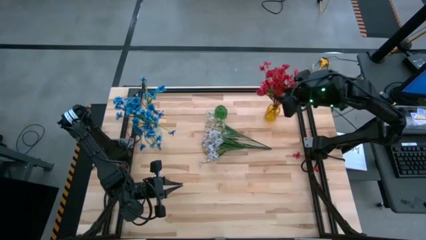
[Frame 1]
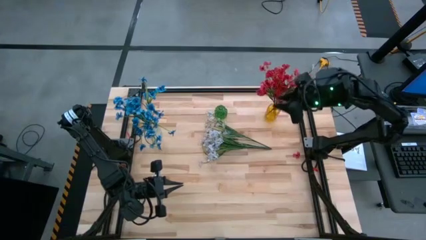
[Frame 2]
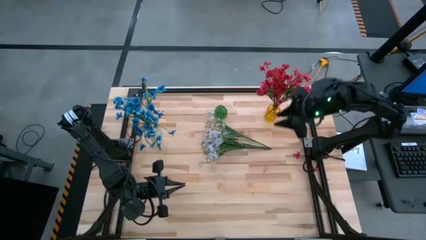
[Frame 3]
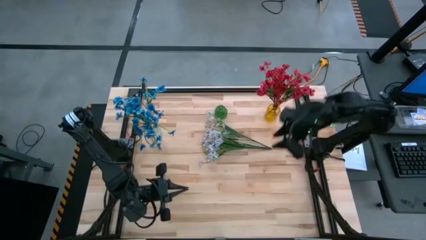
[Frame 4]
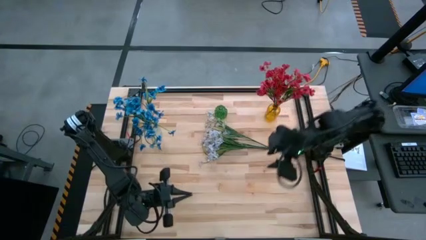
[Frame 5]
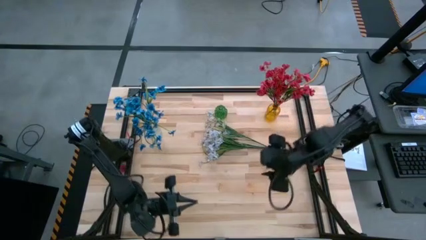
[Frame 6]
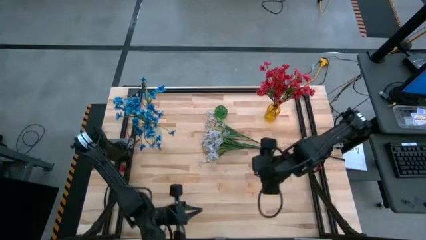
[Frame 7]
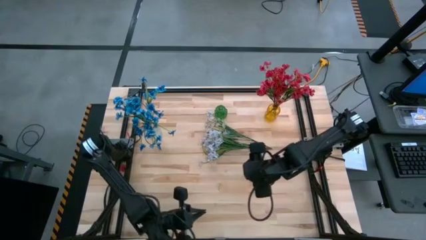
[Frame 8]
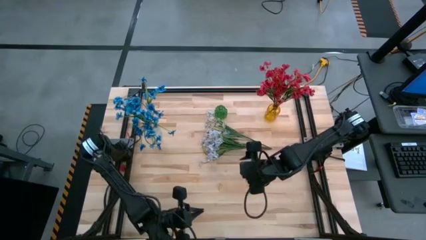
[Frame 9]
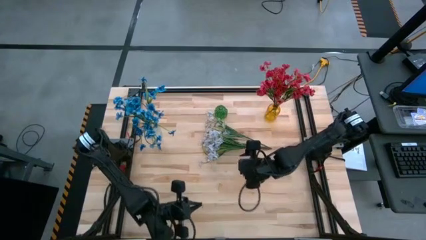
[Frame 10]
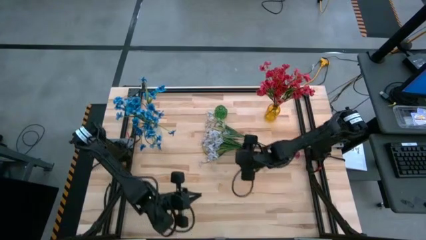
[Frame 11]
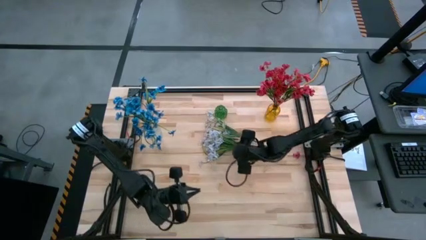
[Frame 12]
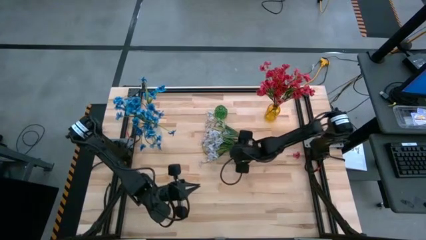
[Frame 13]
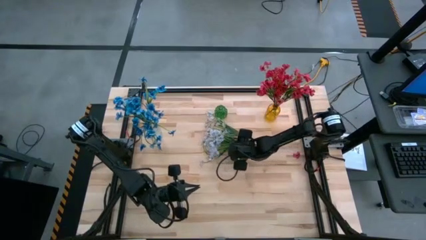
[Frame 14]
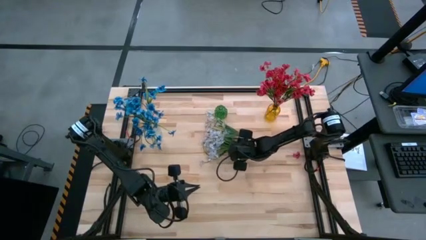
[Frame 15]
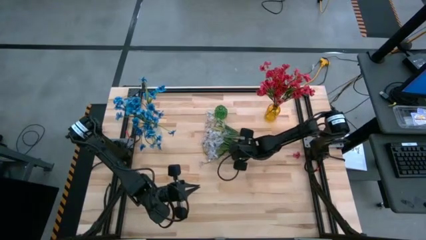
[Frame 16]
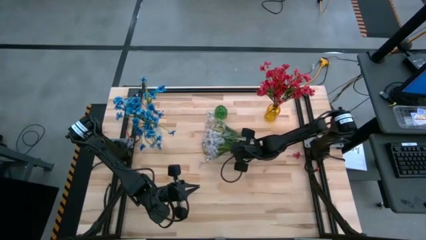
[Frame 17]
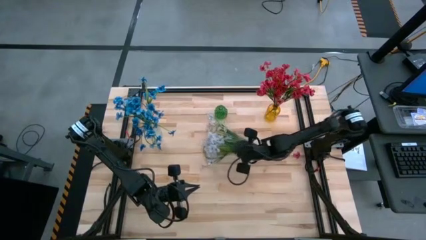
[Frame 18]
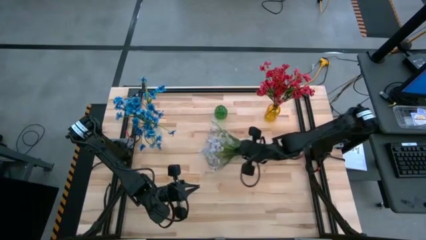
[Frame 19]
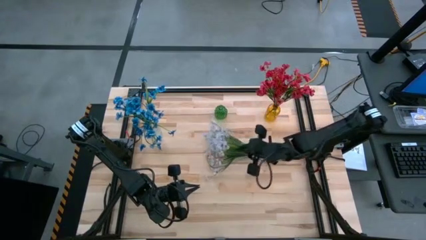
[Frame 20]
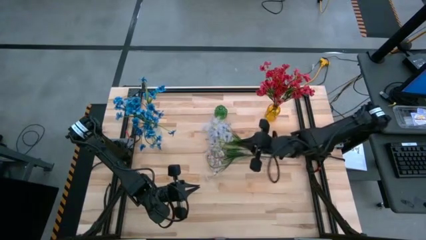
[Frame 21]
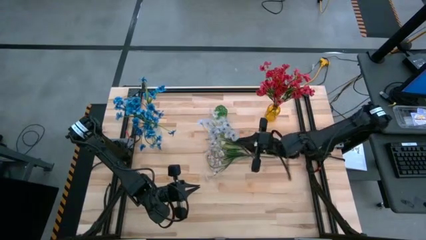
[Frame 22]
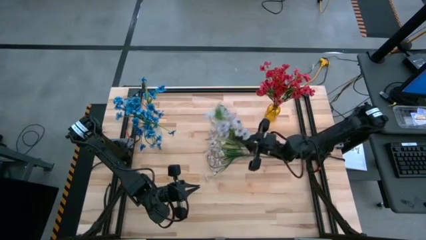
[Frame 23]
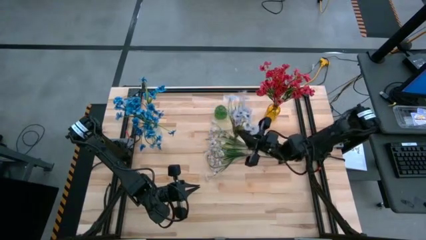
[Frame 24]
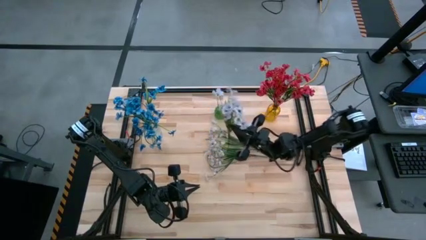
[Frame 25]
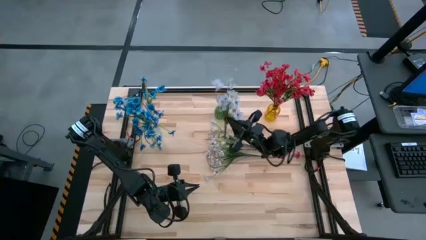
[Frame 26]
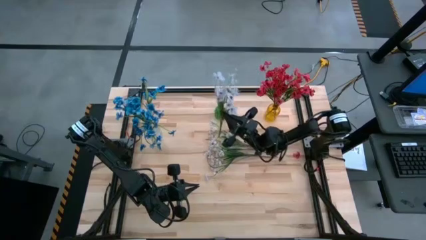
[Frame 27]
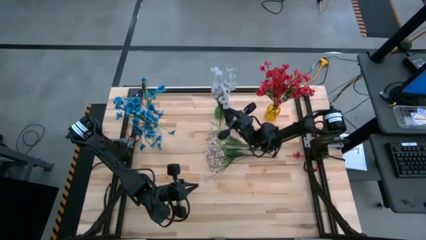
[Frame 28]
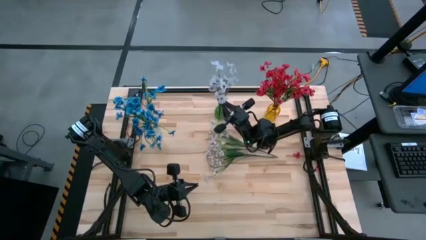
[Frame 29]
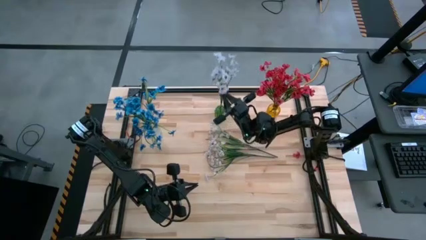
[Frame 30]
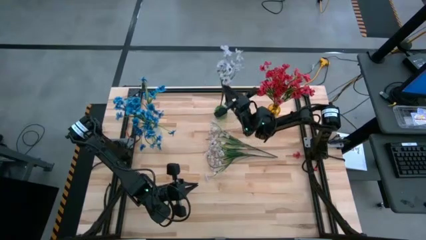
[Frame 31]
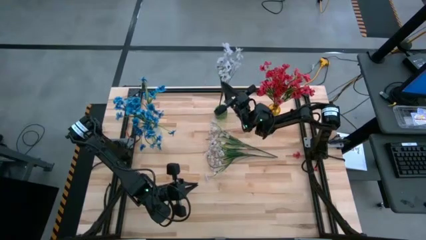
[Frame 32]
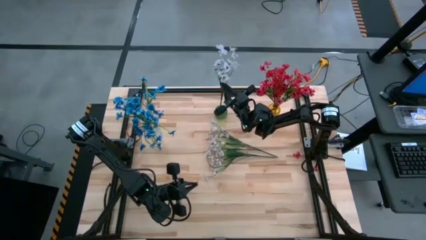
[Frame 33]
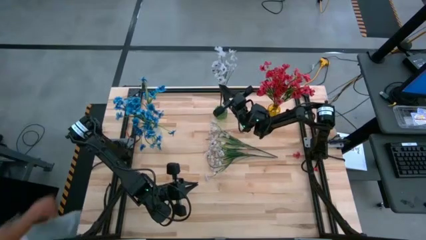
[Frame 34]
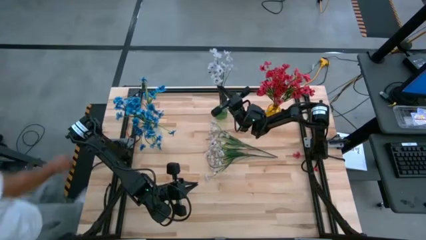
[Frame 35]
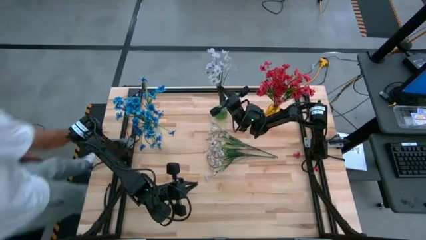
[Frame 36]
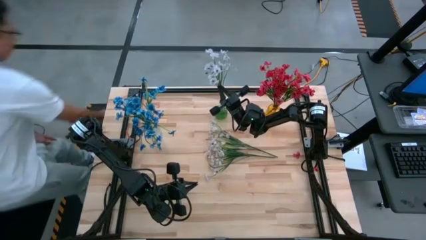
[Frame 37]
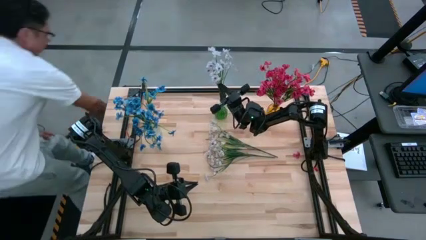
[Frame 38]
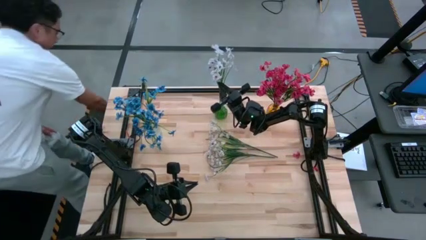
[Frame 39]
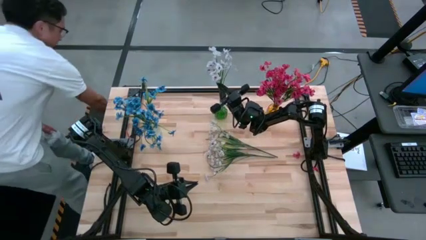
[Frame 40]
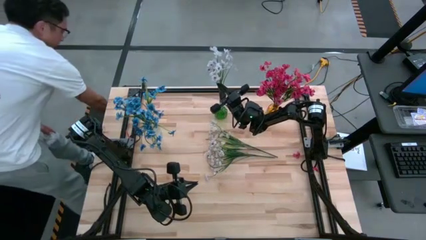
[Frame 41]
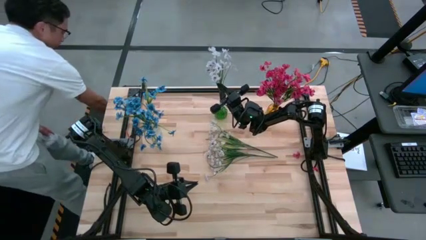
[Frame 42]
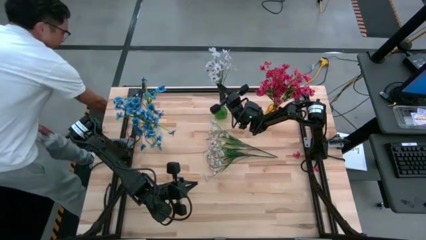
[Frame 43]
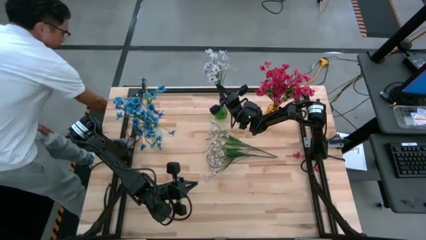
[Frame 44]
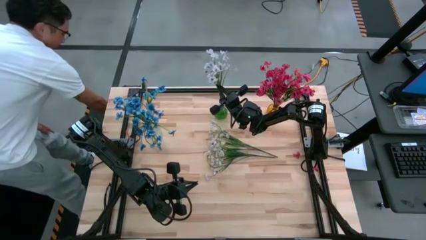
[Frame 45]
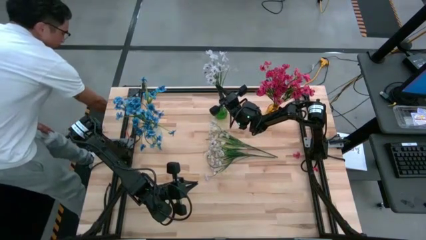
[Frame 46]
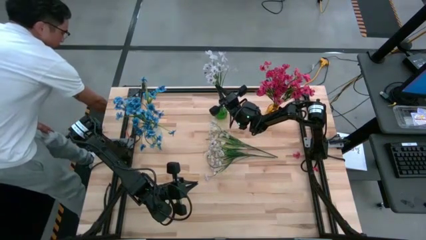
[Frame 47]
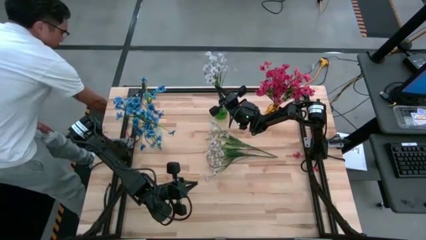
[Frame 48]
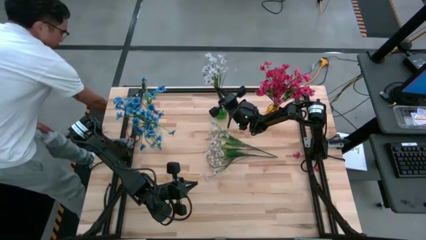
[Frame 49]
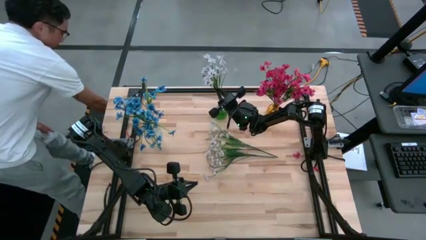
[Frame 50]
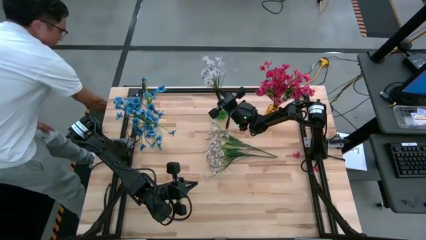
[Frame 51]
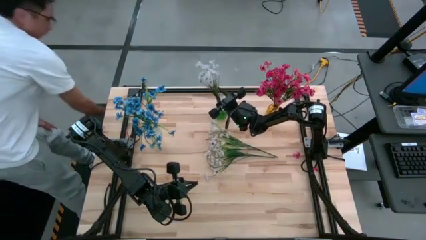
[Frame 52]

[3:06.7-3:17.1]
Task: Sort flowers into vase by color
Put the white flowers into the green vase

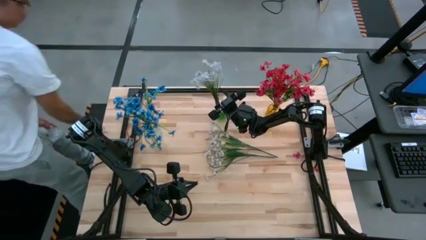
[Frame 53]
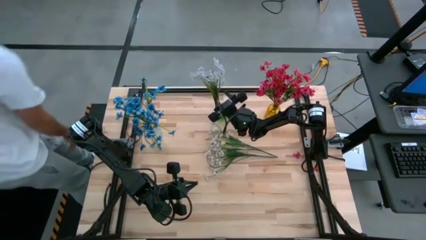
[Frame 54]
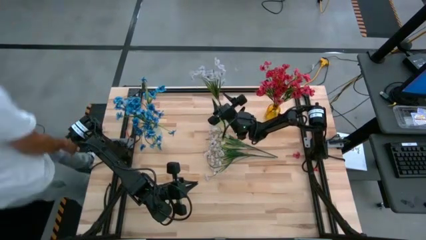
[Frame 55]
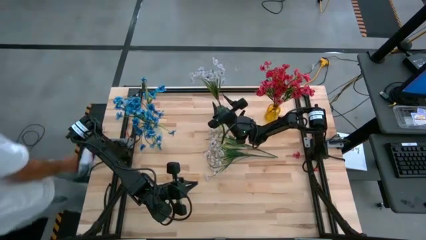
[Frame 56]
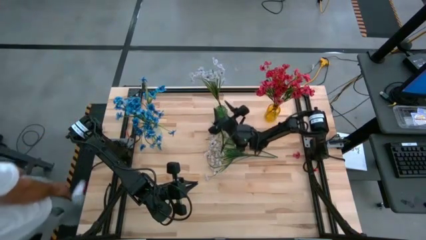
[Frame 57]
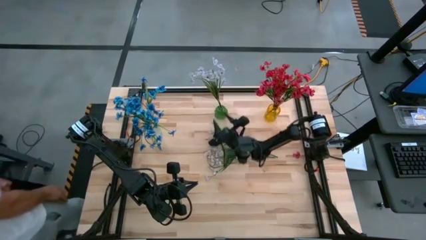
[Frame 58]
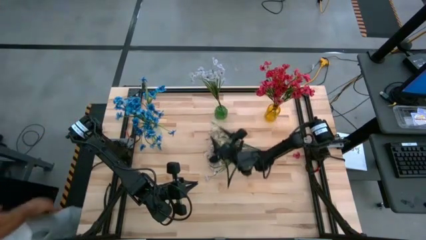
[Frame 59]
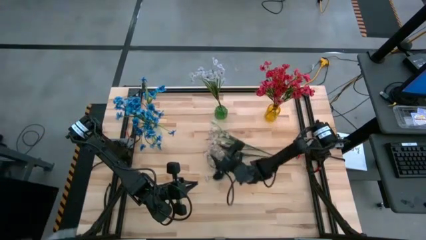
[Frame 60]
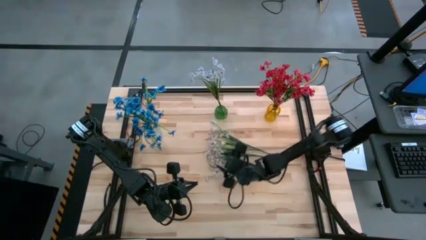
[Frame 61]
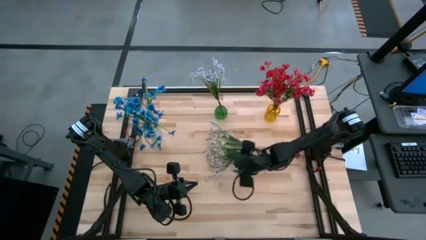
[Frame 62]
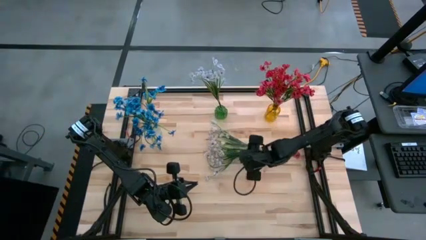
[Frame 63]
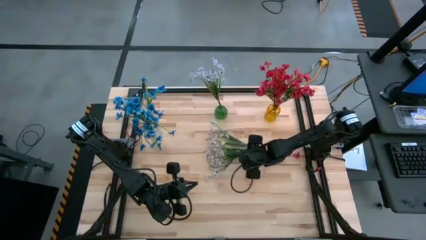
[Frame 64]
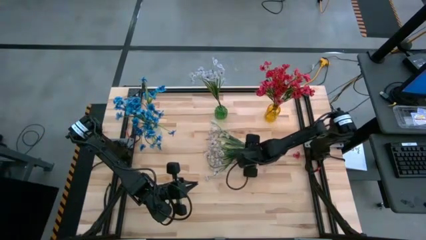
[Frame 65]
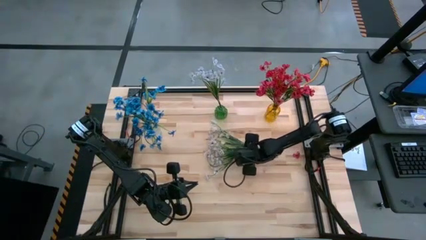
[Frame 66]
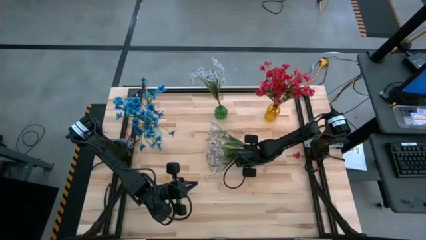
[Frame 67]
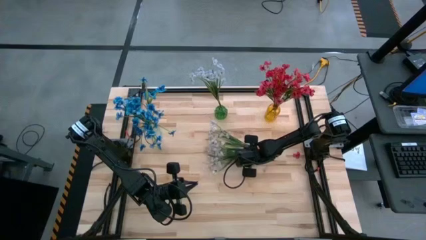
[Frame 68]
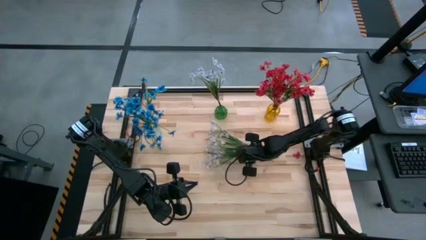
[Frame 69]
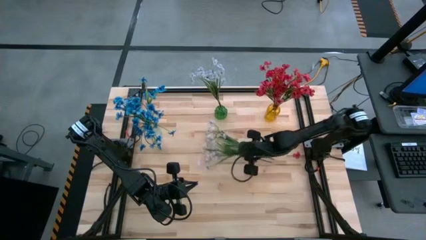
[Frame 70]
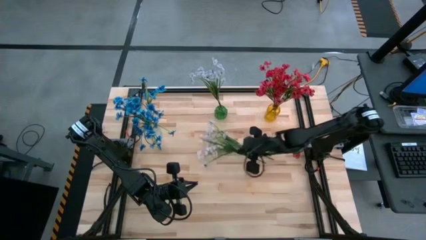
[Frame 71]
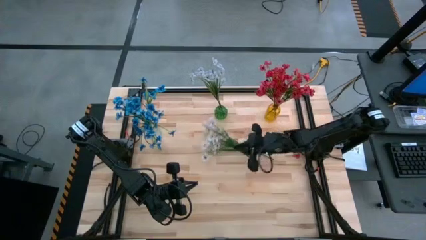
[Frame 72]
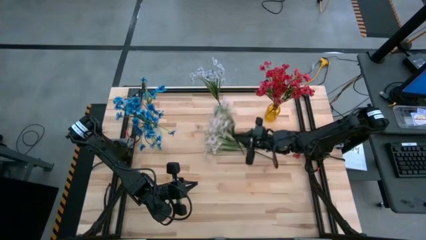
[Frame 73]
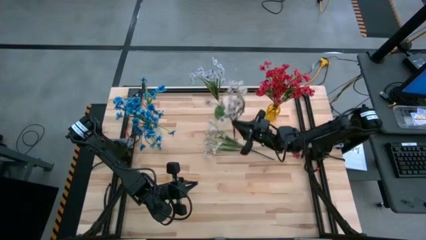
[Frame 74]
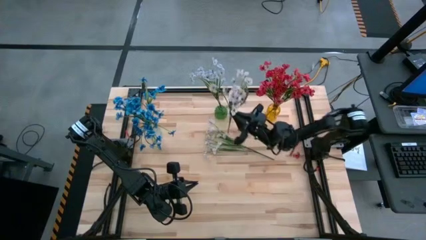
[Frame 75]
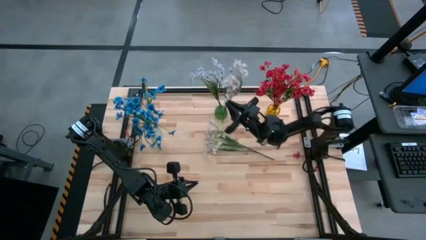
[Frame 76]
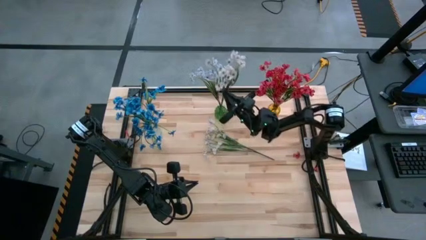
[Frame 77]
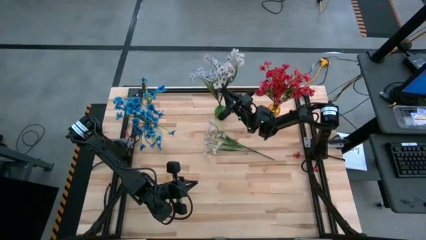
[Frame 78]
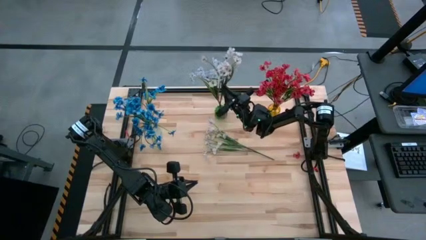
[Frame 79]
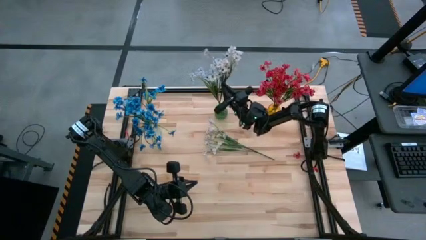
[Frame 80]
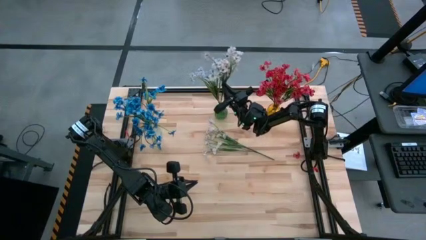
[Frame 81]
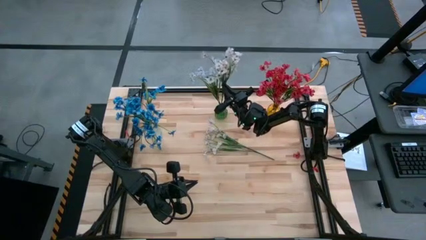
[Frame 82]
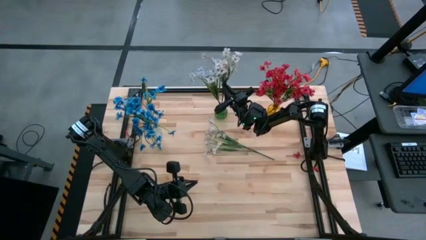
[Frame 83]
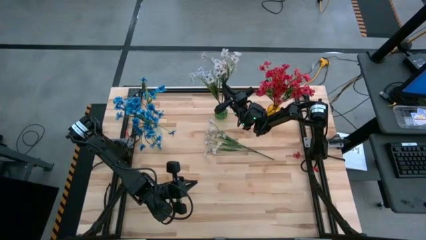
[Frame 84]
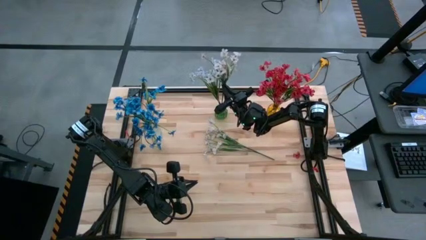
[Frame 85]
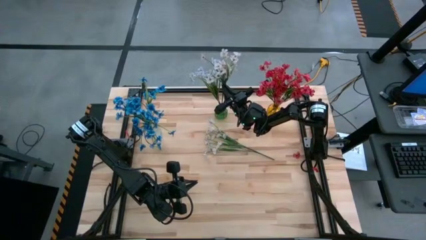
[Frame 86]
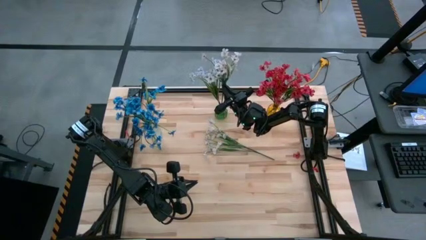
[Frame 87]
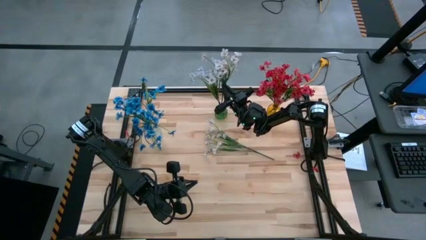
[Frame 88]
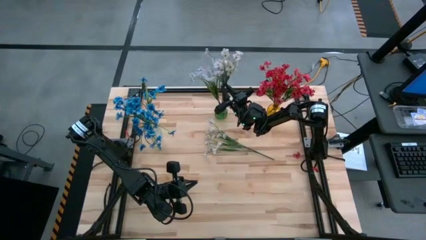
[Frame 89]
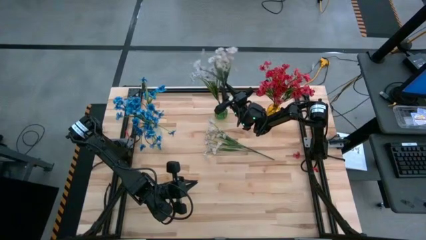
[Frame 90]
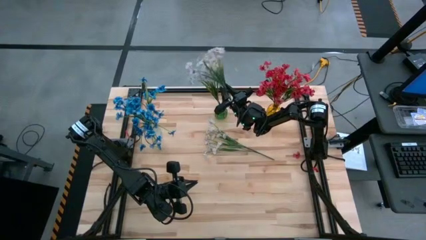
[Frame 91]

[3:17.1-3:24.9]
Put the white flowers into the green vase
